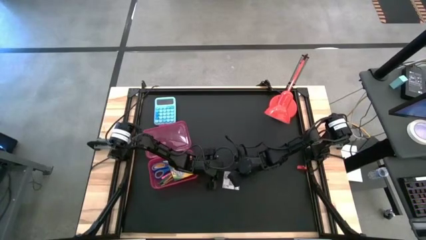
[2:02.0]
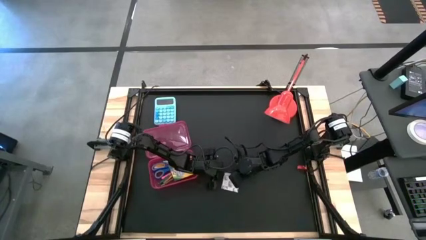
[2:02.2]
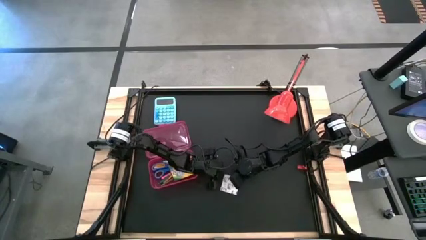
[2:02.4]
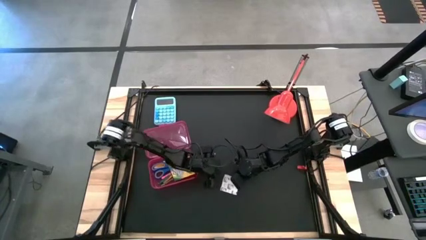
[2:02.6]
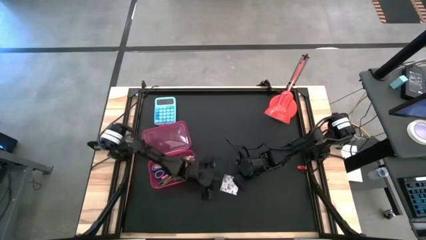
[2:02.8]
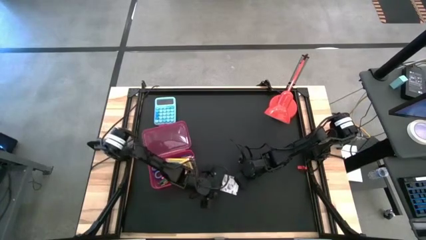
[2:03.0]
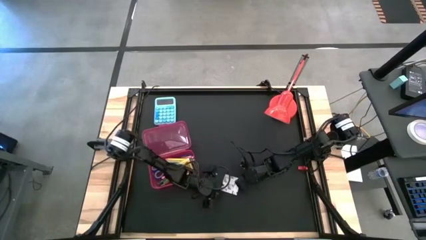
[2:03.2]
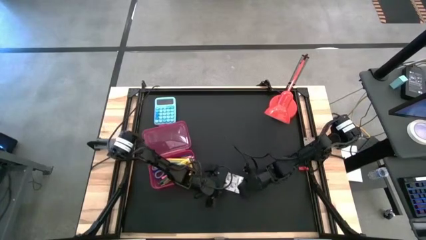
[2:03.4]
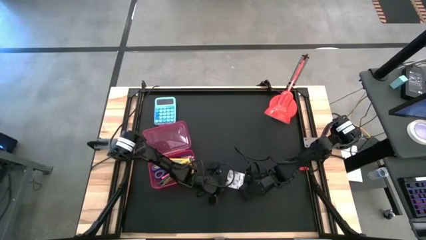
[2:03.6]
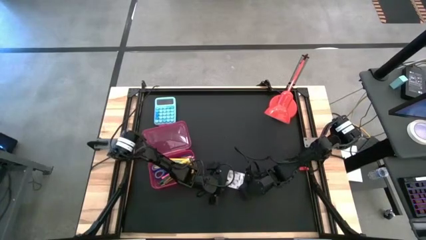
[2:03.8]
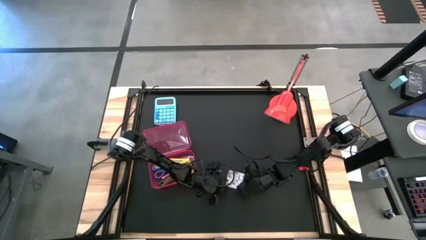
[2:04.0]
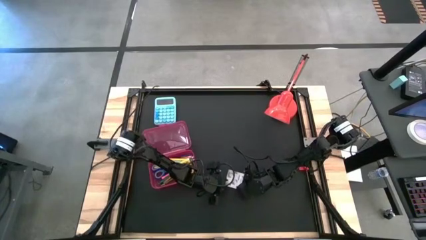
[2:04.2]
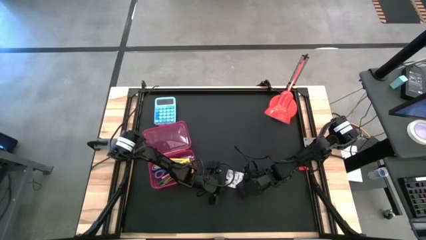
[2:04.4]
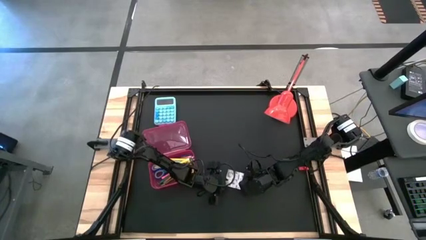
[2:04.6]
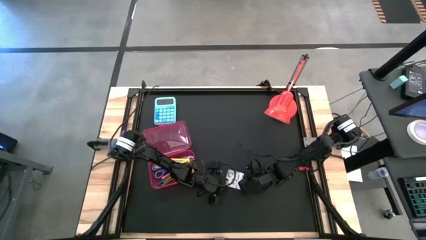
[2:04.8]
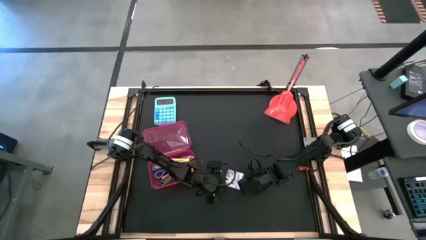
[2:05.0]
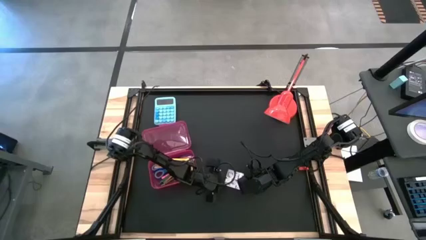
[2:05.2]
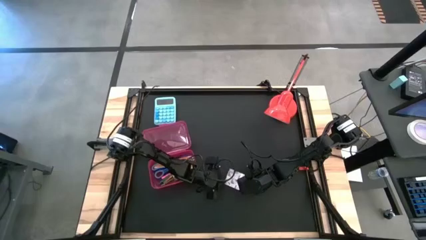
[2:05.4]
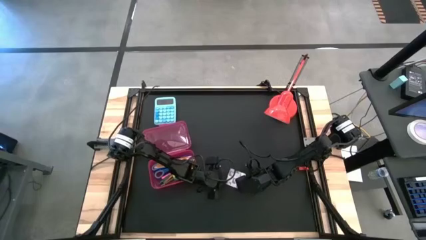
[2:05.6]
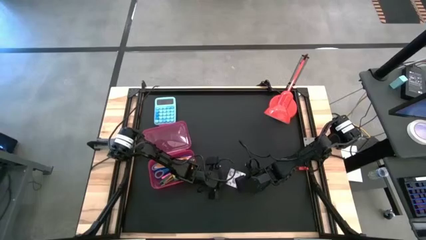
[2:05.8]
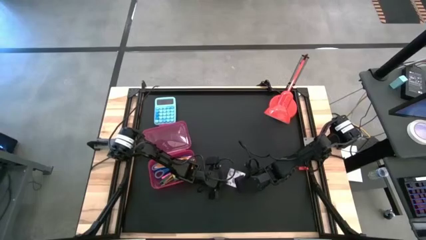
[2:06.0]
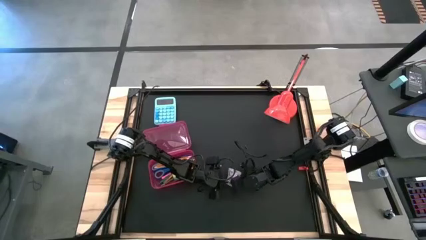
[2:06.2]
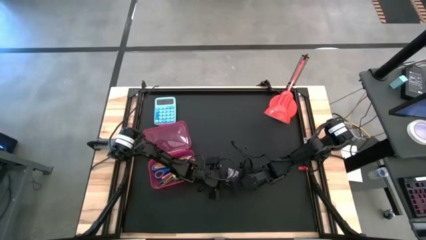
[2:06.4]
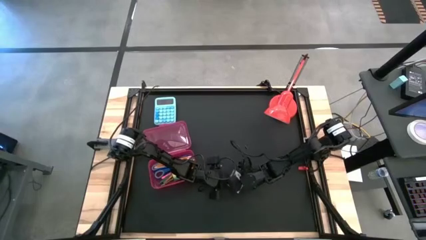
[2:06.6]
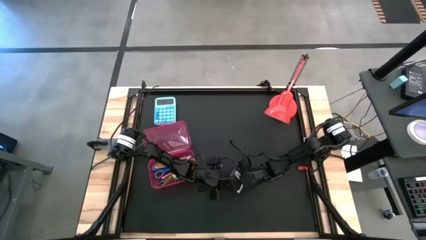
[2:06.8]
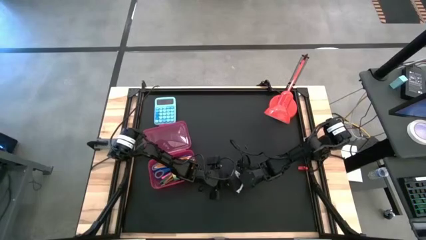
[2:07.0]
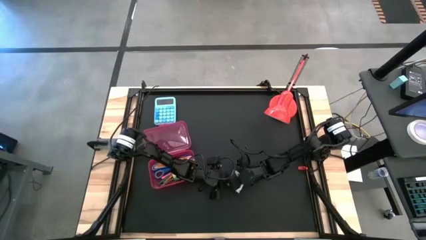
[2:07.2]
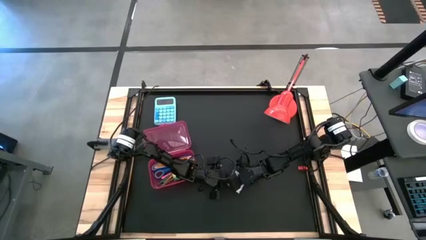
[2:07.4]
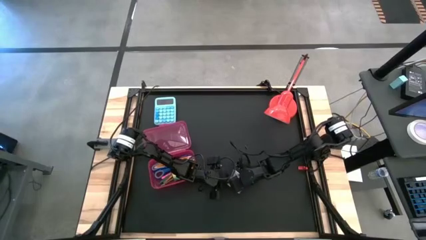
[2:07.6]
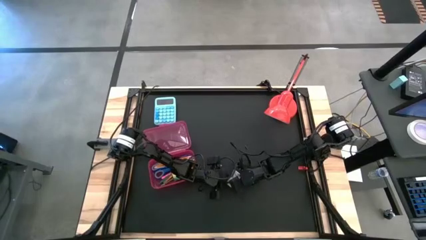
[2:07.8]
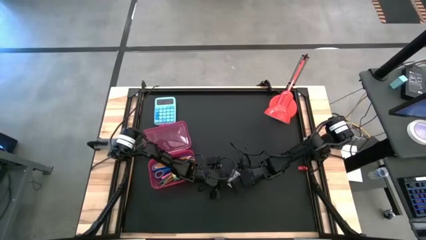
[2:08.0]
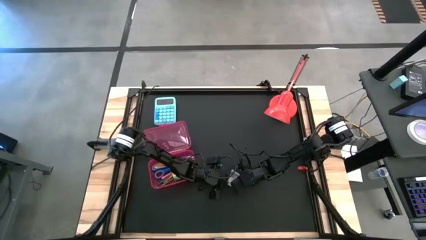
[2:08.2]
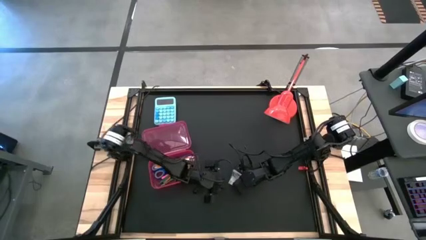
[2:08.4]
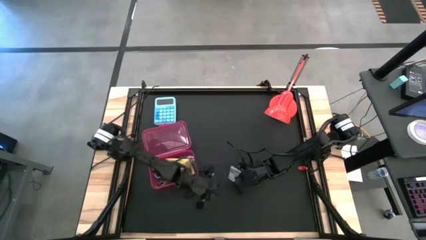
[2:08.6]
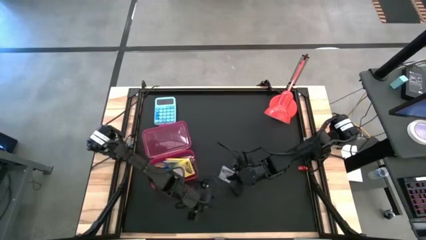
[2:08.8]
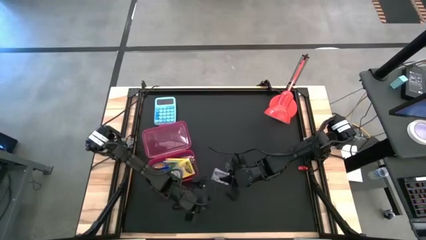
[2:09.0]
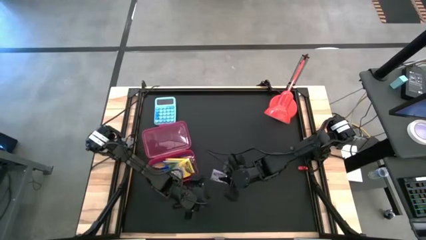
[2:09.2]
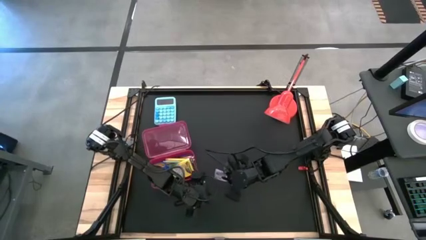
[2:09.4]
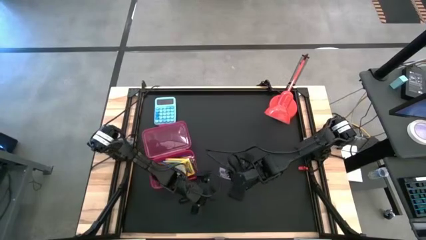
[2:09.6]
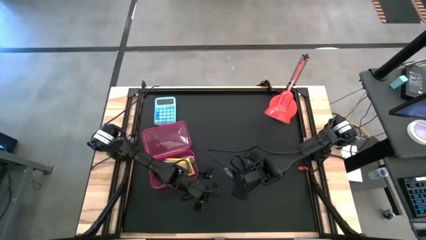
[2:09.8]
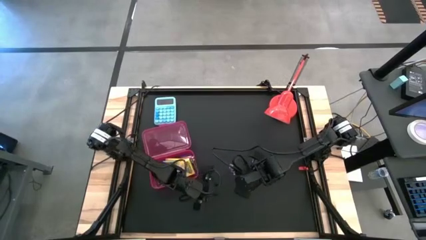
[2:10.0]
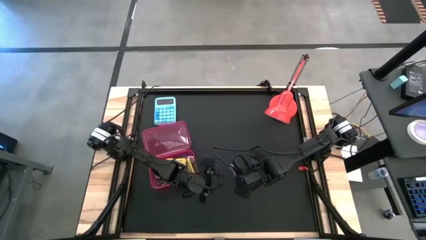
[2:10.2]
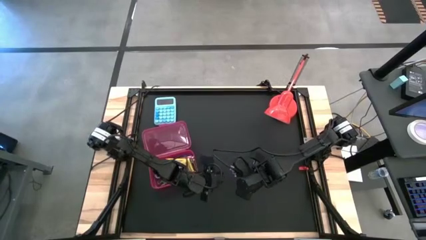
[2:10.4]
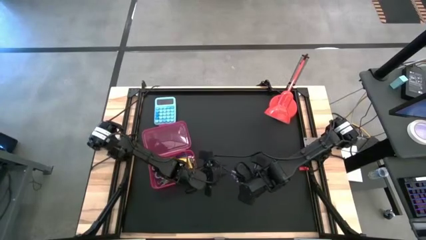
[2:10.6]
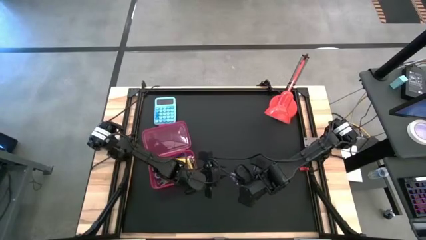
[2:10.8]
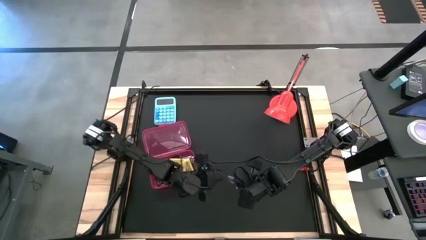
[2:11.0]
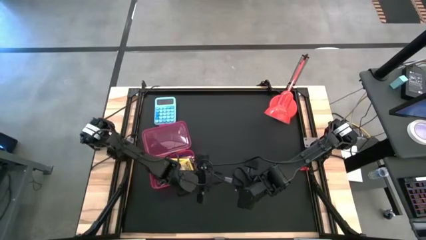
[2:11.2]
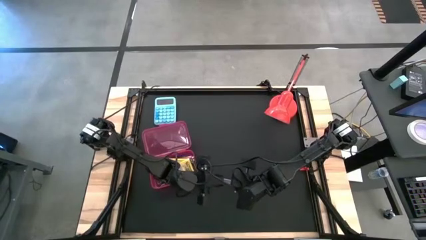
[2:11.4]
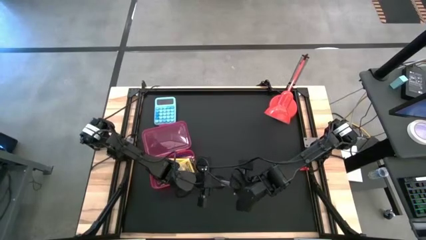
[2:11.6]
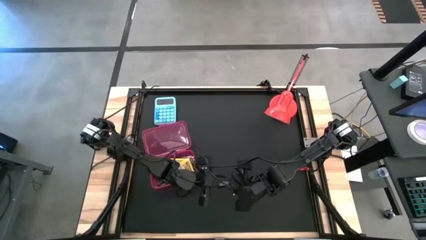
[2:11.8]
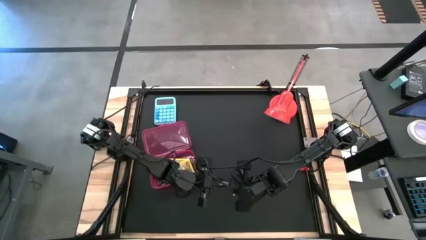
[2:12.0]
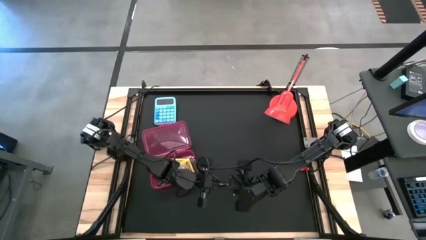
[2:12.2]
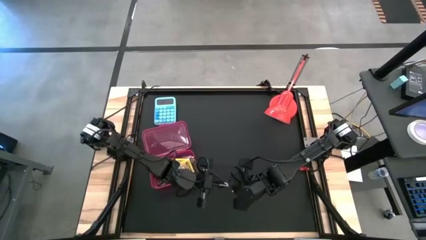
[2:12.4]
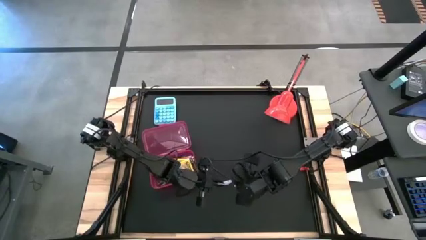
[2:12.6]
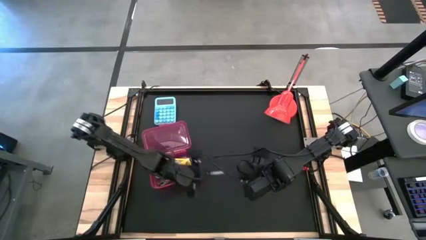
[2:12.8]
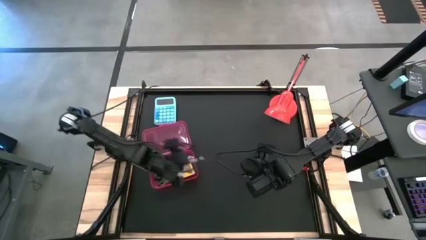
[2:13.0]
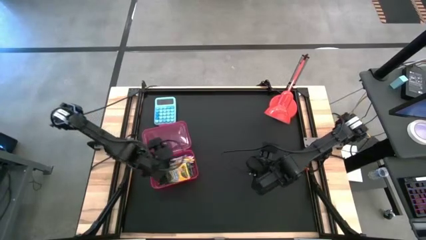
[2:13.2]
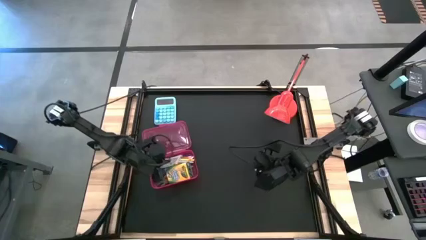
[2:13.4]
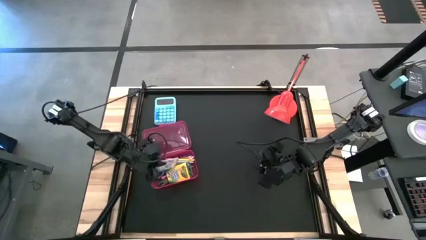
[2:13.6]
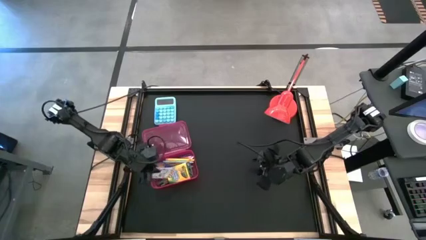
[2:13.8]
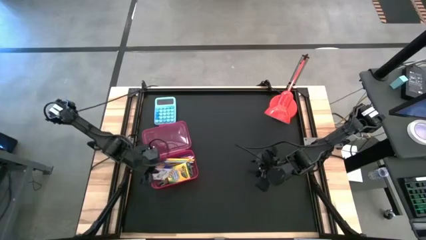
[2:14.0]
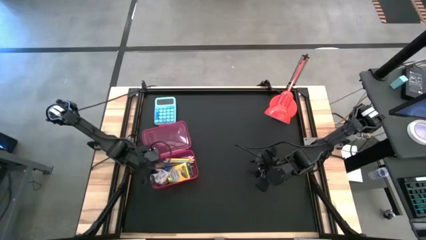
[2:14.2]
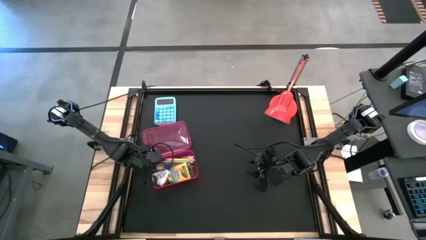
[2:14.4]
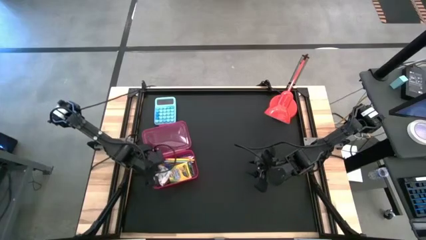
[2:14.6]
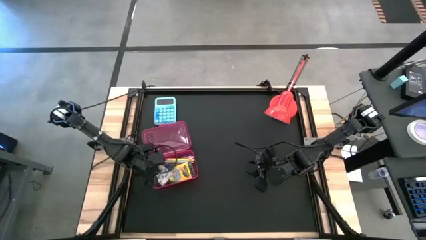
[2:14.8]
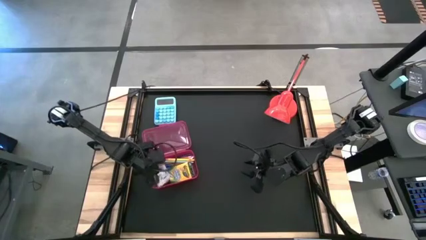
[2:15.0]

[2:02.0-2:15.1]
Task: Pack school essentials
Put the white sticky notes into the pink supply box

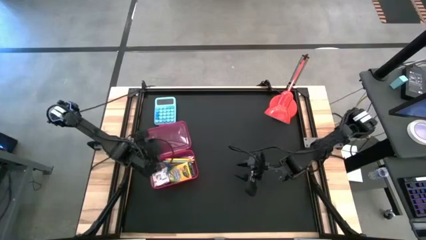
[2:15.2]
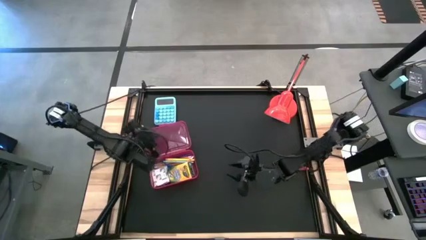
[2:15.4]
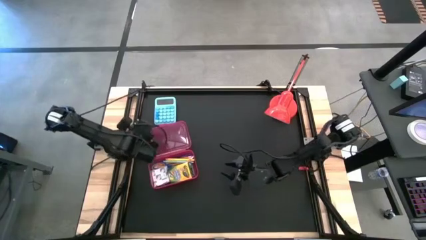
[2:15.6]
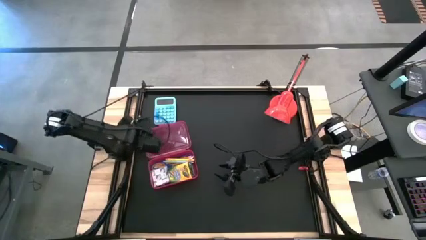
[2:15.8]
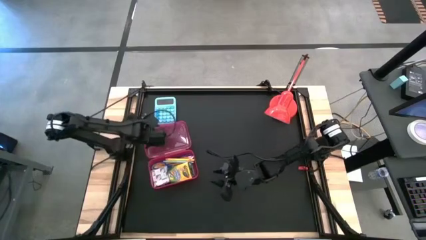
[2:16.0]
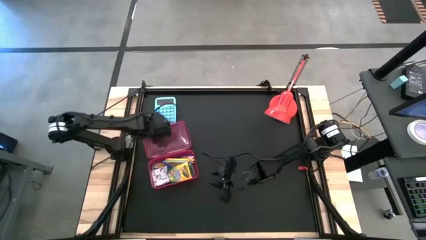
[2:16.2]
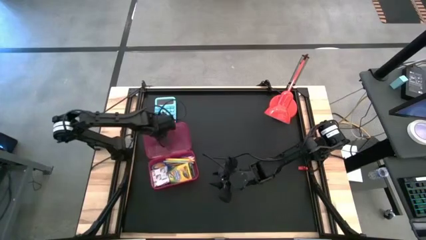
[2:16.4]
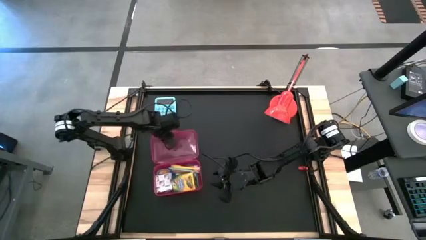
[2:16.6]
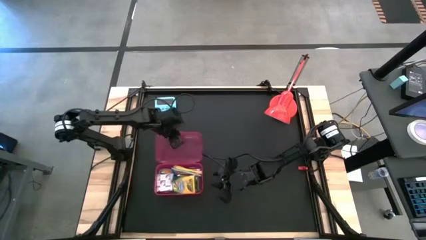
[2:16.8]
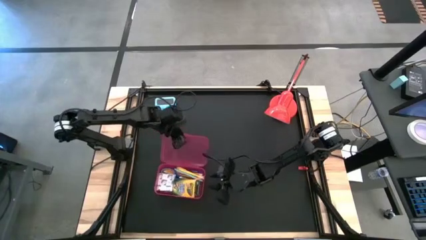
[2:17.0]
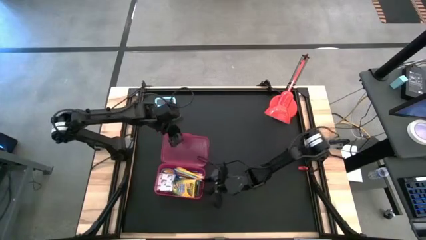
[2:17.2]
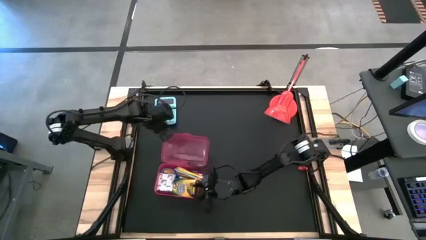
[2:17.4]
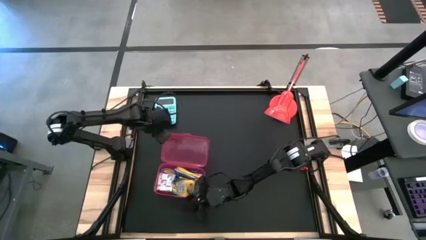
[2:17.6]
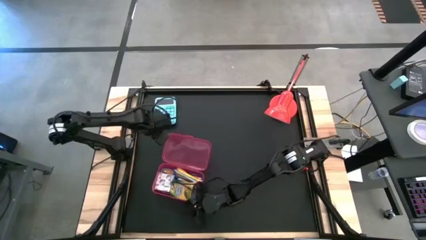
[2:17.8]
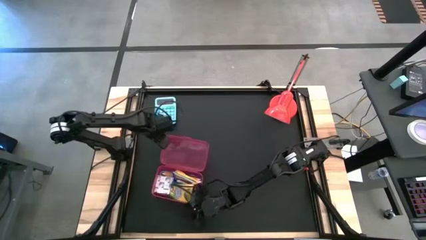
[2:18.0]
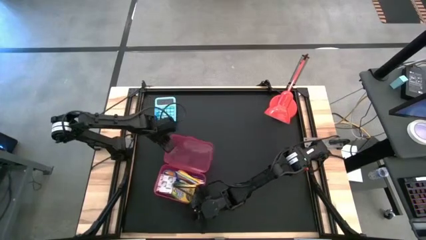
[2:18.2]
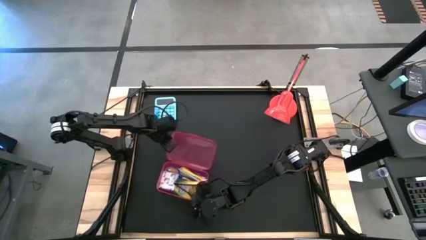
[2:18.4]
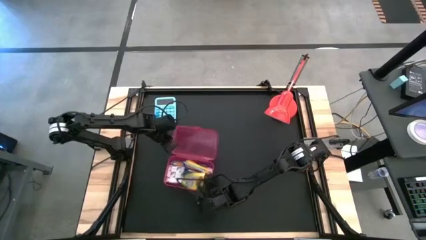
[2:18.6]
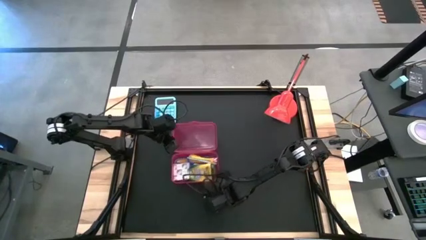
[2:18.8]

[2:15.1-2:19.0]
Close the pink supply box
